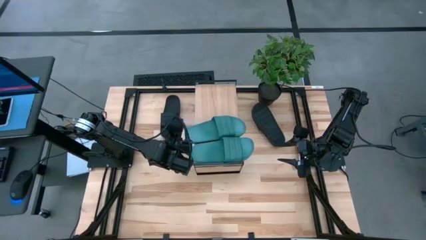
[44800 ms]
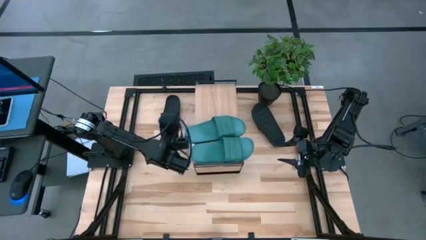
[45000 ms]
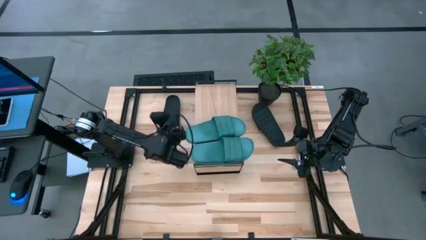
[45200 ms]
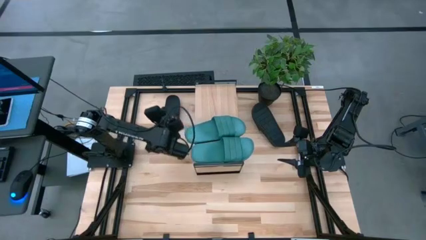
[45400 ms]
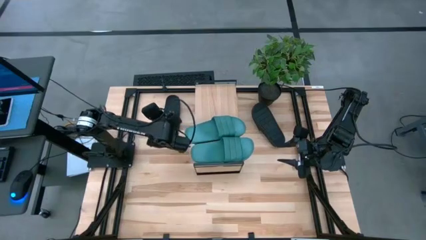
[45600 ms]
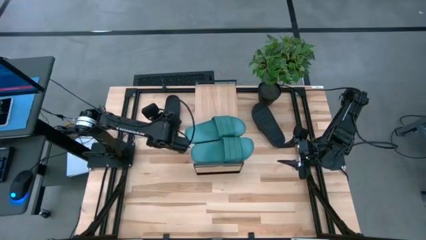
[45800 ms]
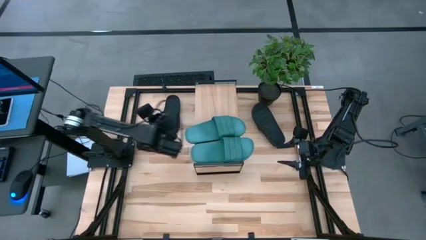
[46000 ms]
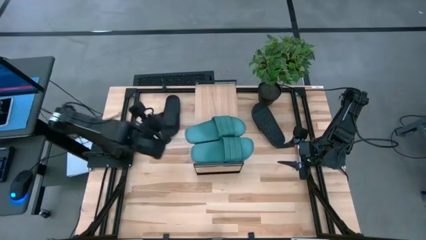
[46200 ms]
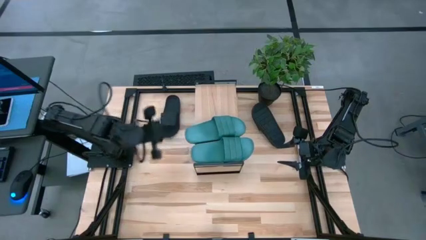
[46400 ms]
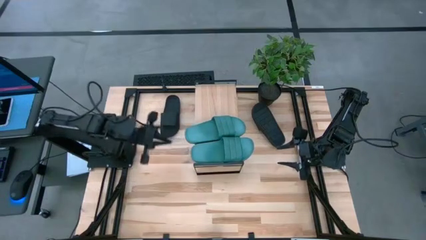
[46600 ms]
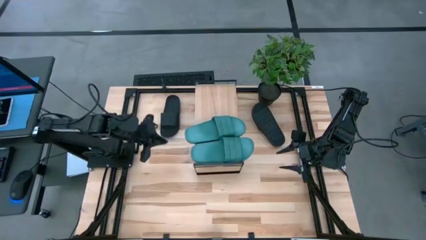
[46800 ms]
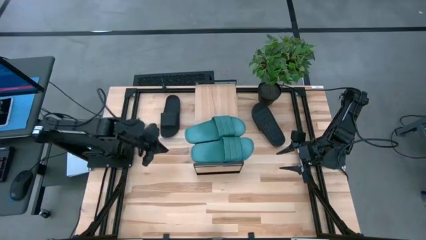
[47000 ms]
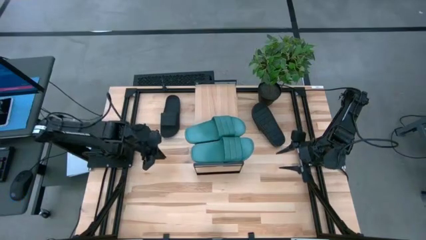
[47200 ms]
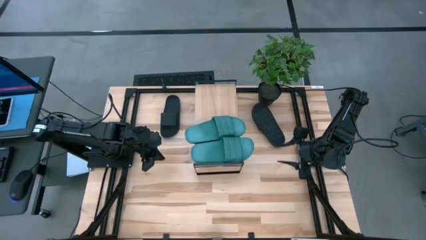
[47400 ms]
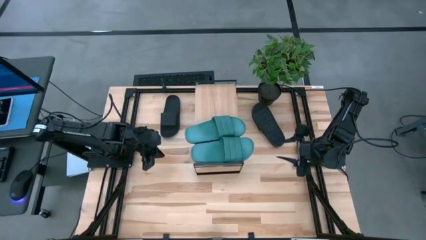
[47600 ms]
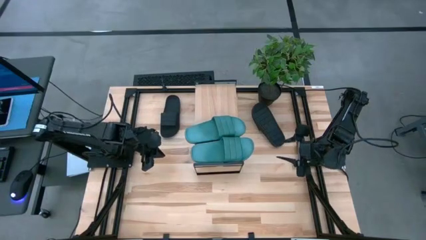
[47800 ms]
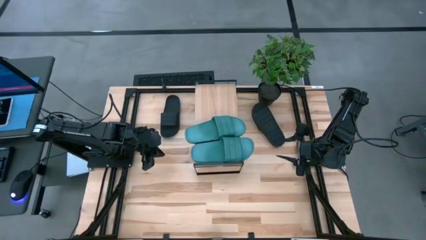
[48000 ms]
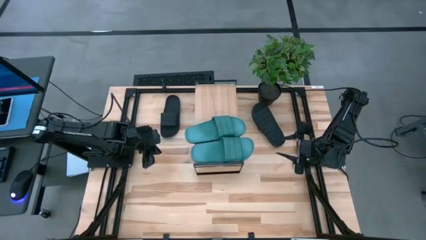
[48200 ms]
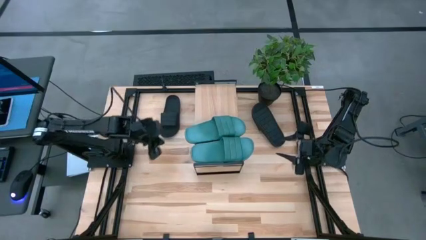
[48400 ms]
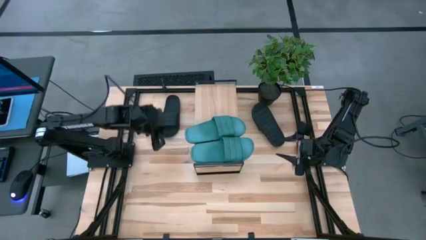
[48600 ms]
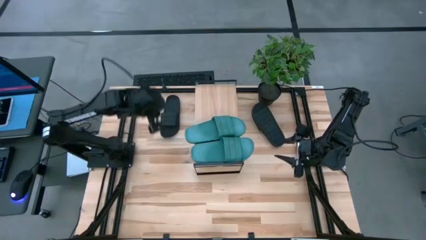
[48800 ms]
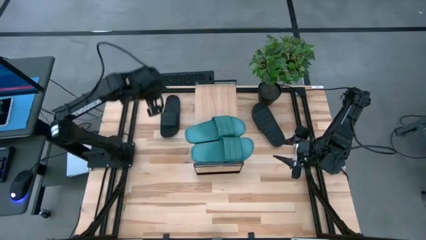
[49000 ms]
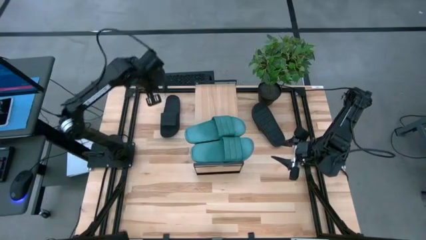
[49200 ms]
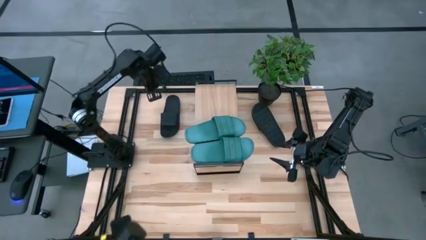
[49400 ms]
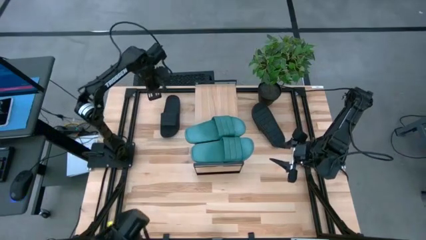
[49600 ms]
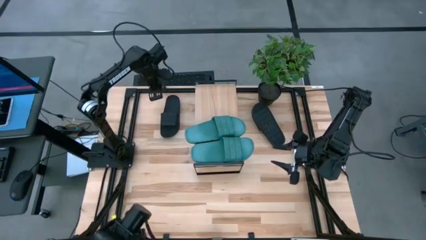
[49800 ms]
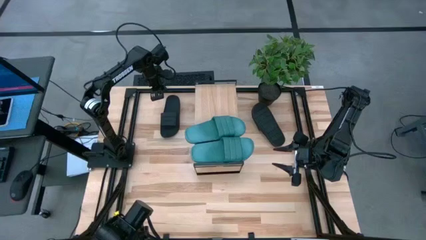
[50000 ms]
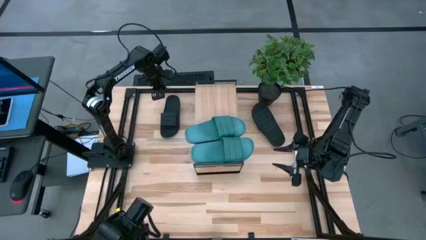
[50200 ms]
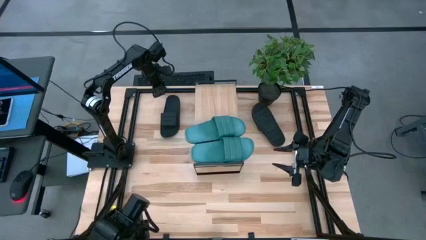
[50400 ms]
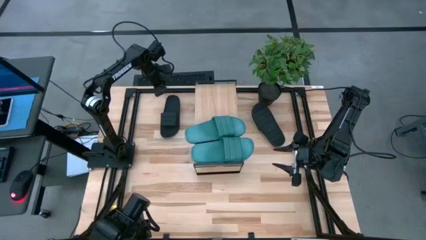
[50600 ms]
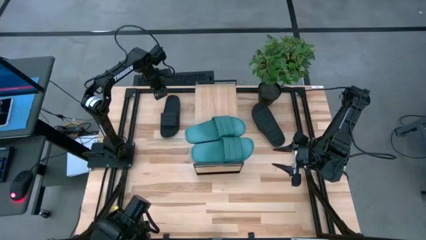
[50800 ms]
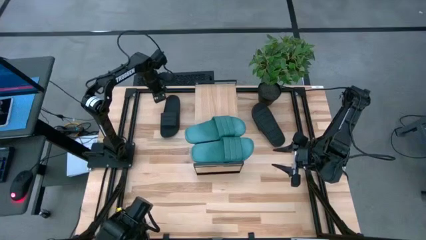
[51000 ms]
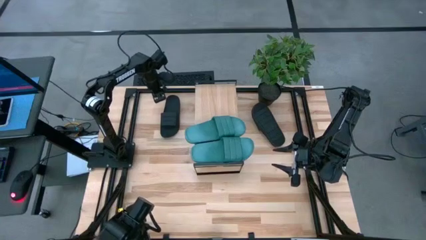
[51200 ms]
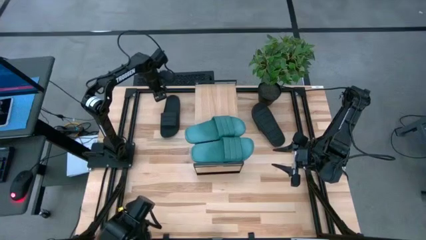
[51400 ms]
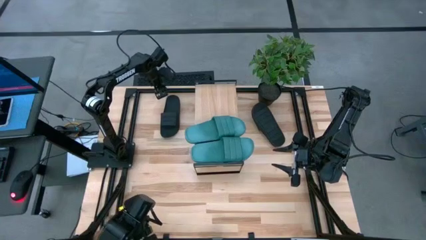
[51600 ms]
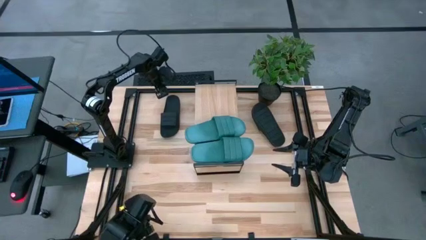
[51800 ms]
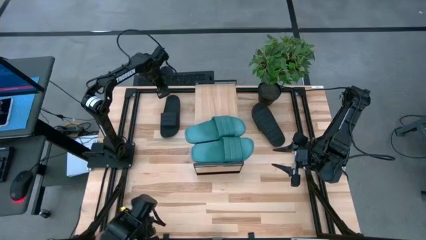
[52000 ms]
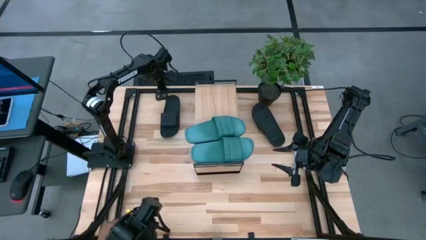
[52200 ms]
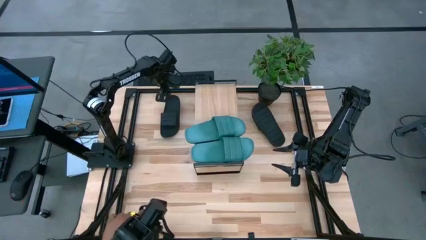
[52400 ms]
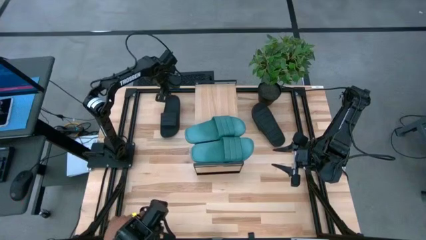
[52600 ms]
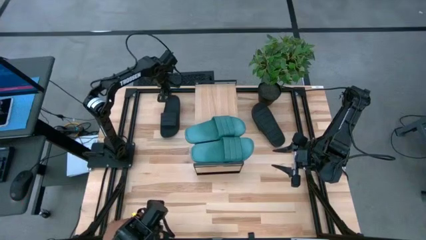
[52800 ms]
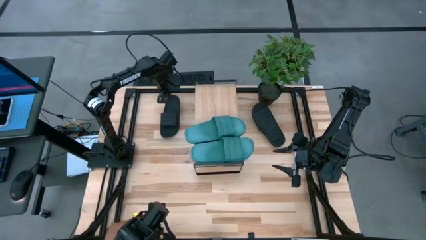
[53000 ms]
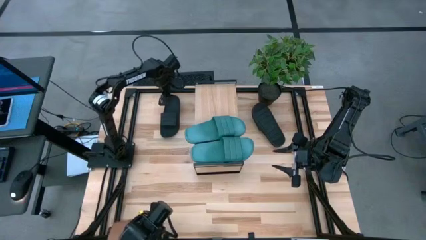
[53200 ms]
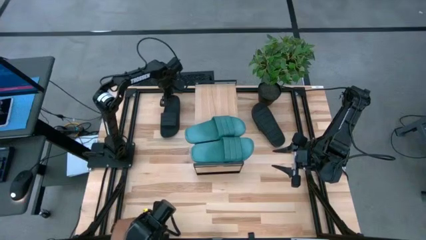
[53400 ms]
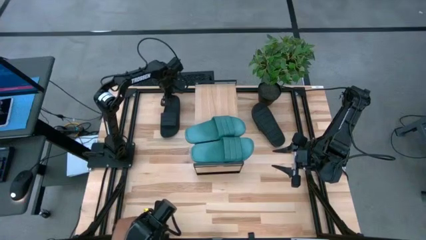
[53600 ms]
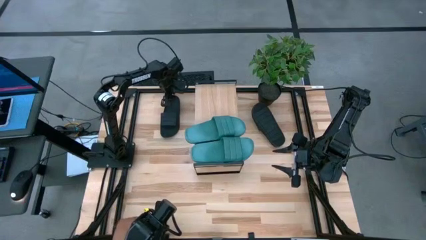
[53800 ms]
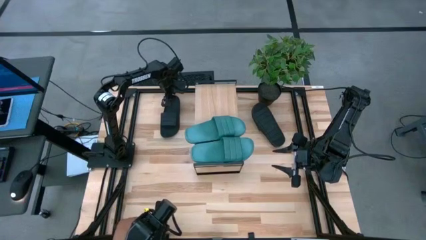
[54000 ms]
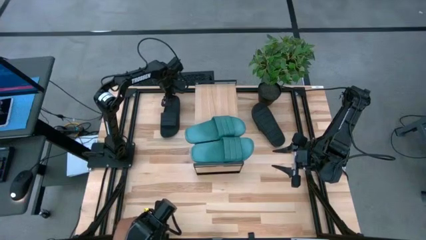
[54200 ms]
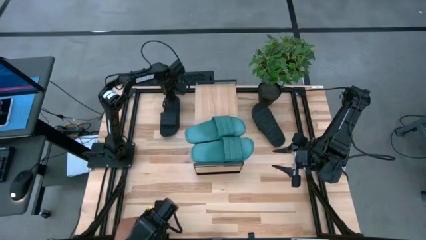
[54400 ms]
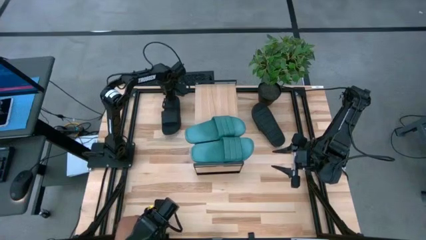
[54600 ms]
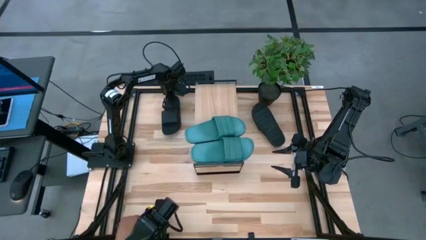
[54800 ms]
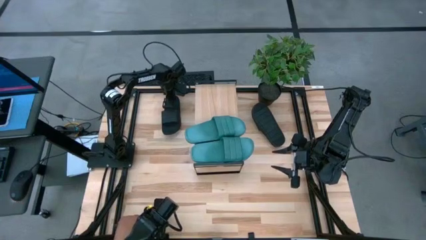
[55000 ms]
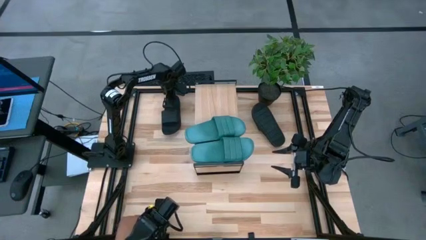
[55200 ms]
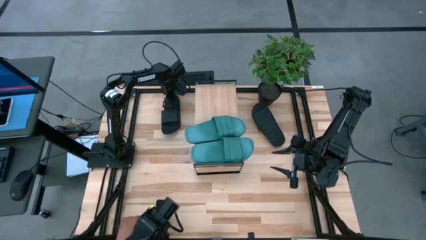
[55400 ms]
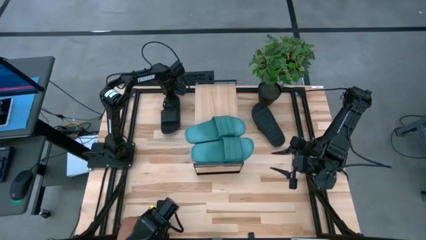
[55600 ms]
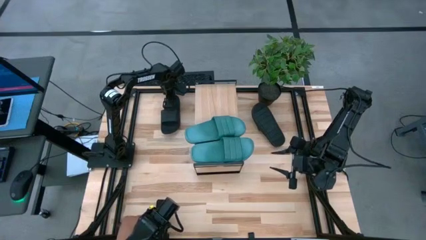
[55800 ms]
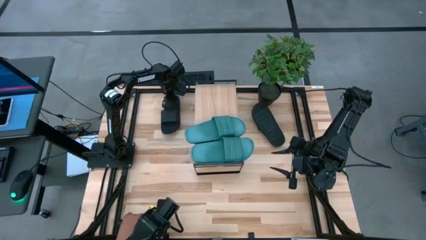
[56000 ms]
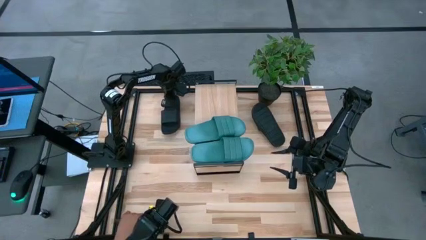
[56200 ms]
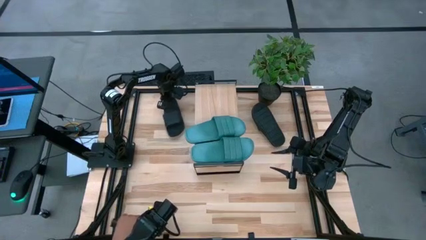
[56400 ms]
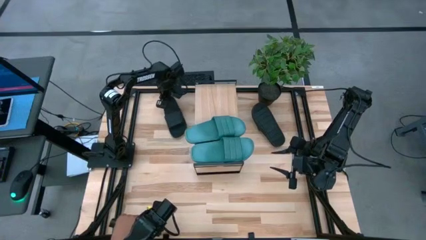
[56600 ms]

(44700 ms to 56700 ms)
Task: Pick and place slides into the shelf
Put the left black slipper on the shelf
